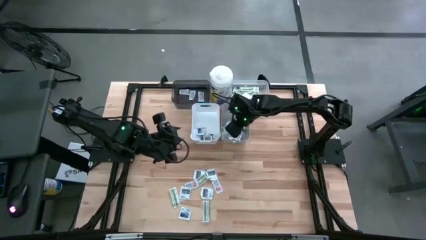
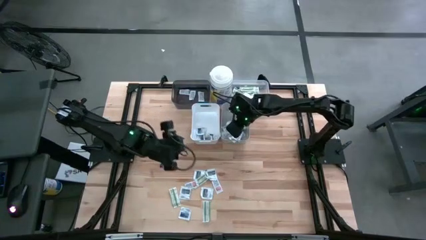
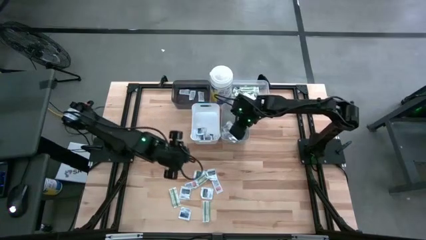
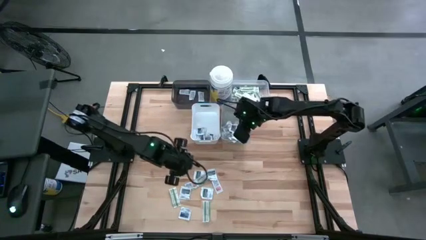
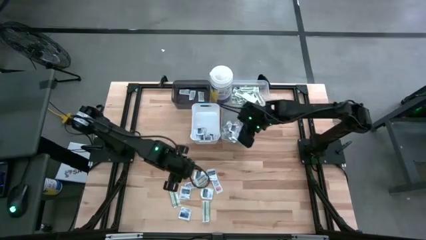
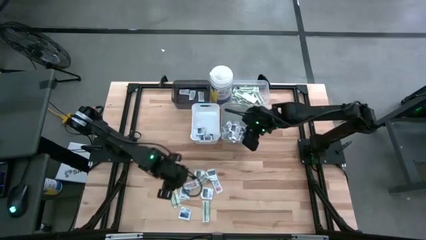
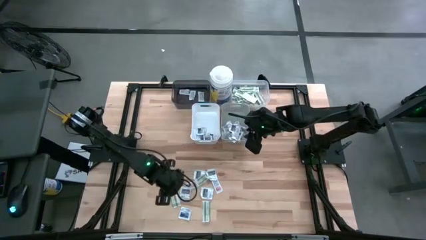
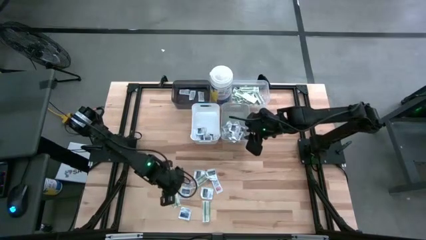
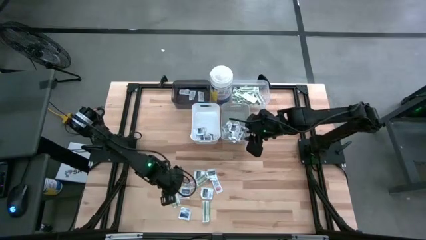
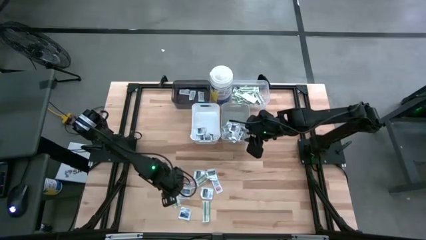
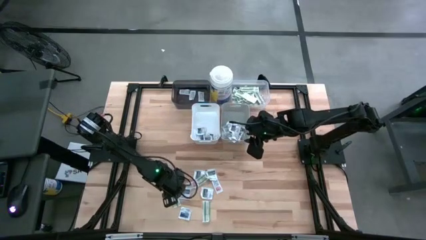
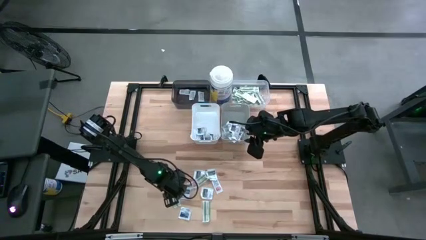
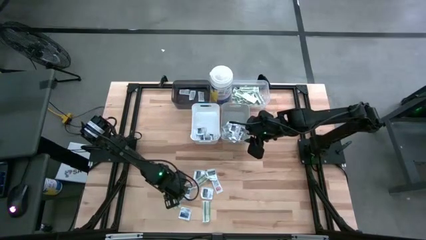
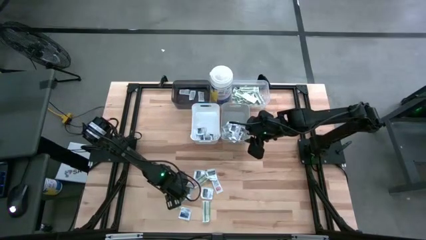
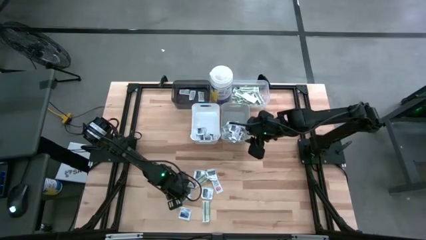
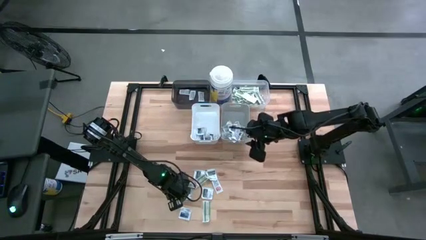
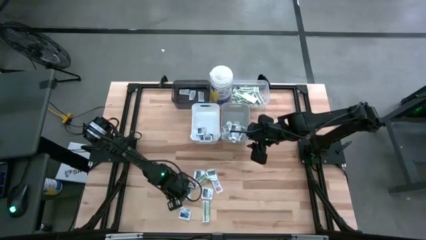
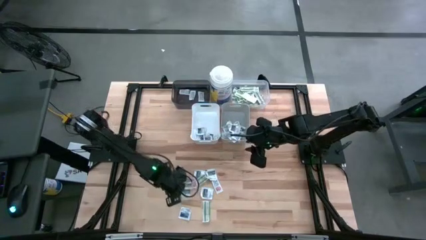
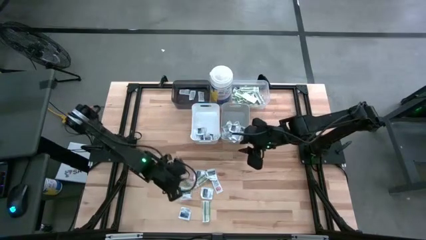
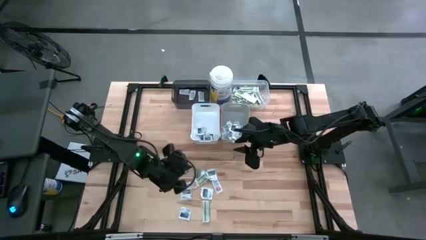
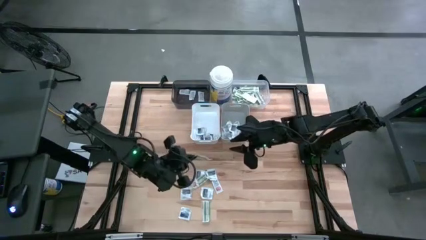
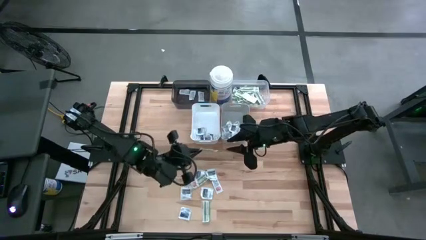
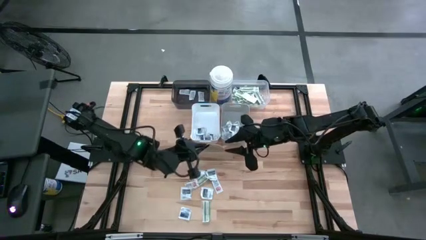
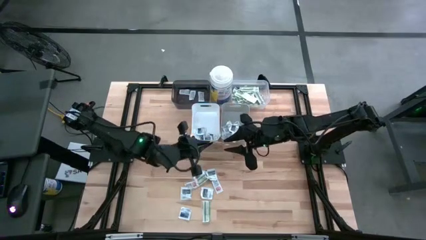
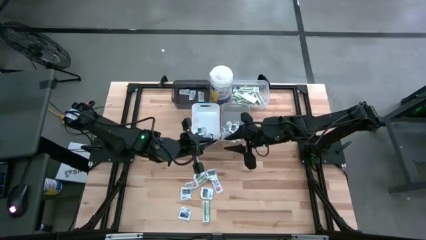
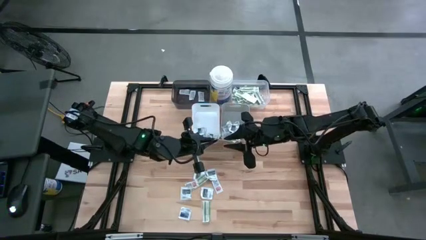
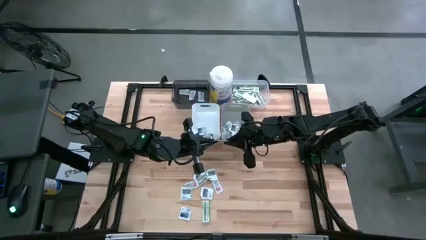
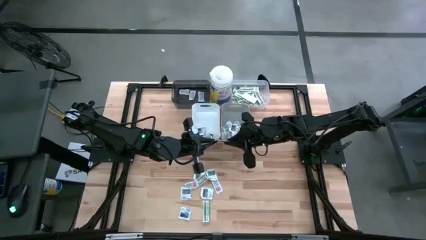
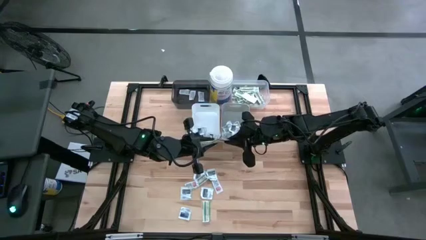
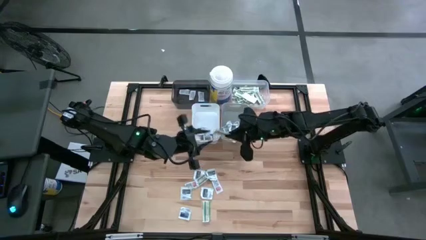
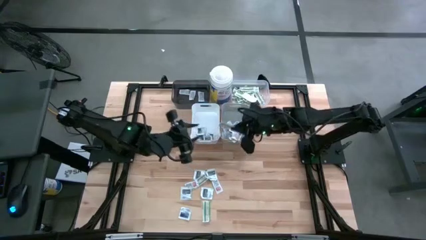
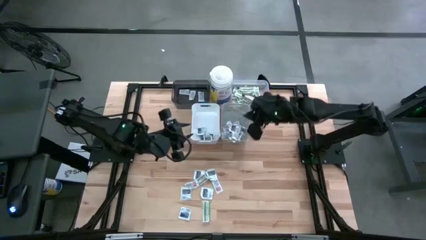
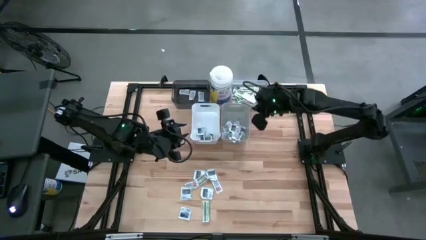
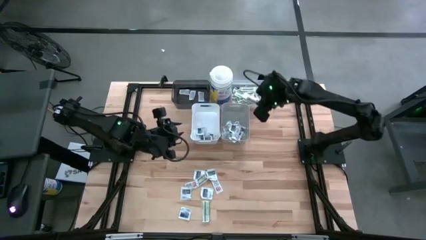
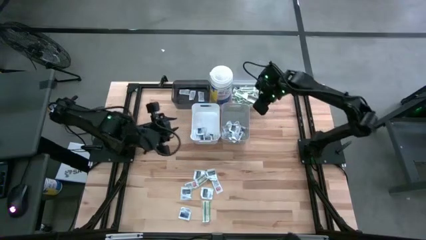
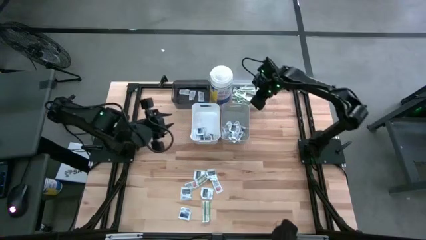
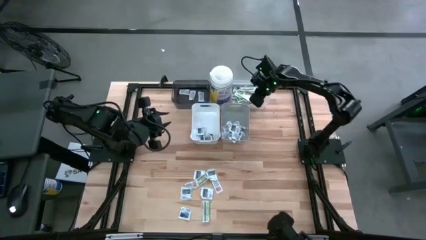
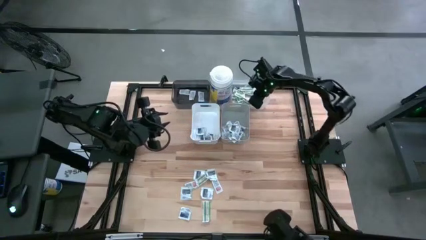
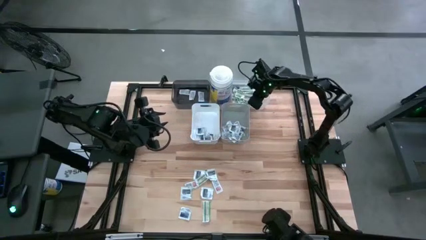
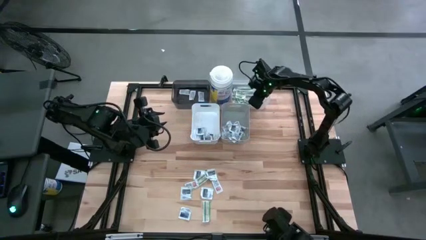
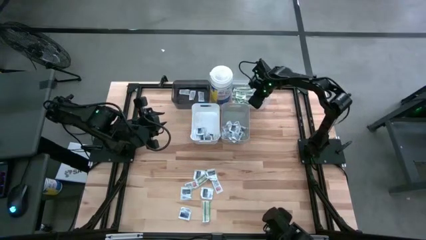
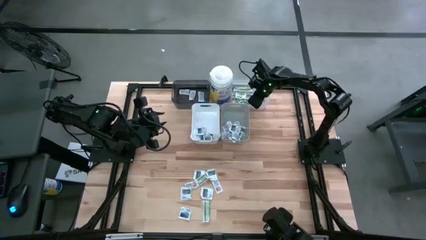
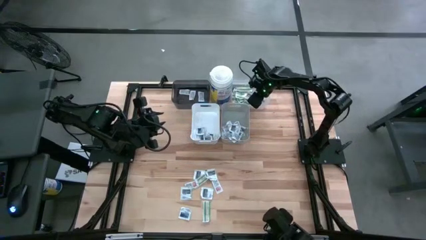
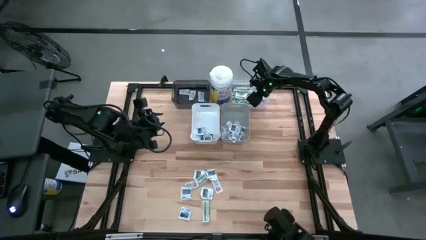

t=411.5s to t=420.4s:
Task: Pick & Place First Aid Supplies
Put the band aid into the transparent bin

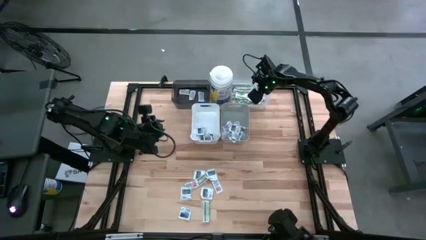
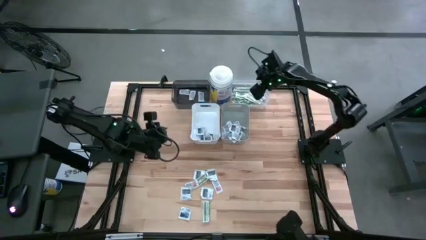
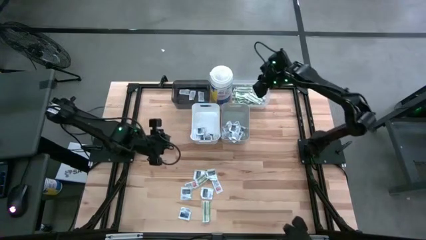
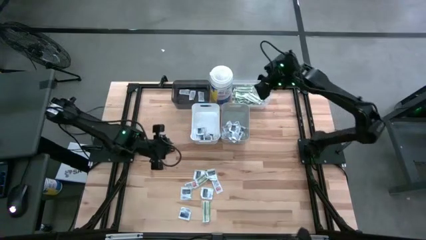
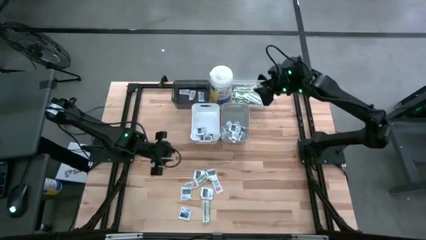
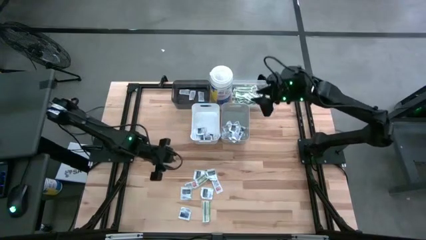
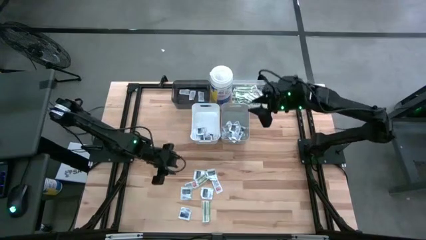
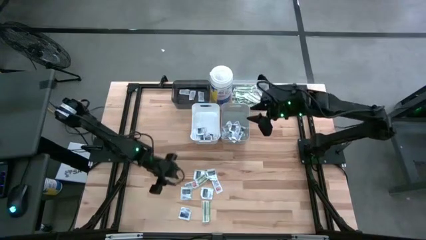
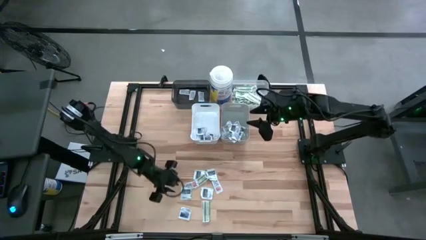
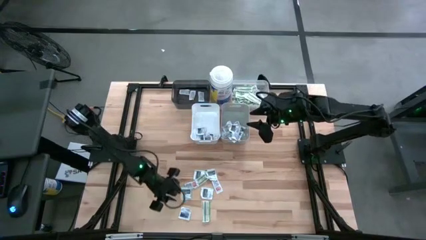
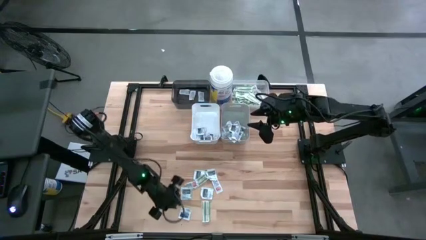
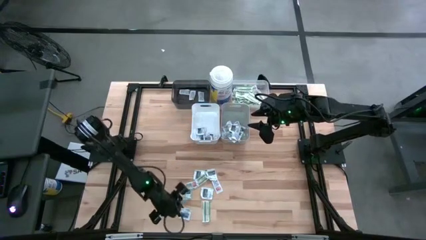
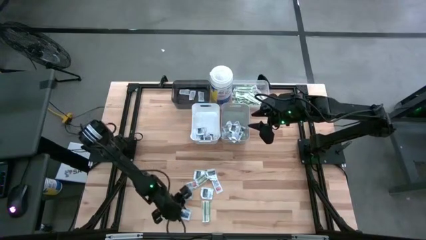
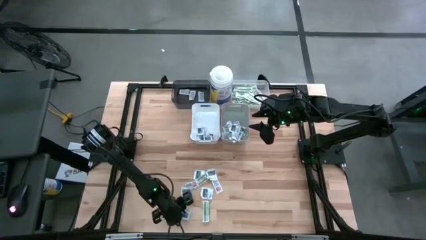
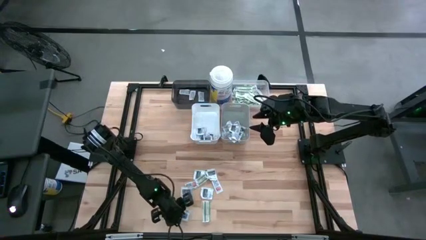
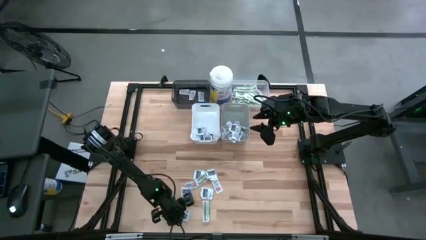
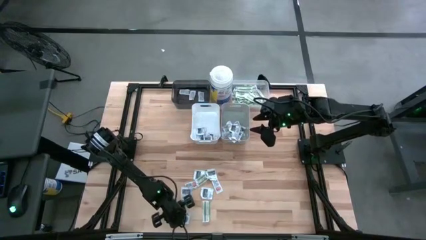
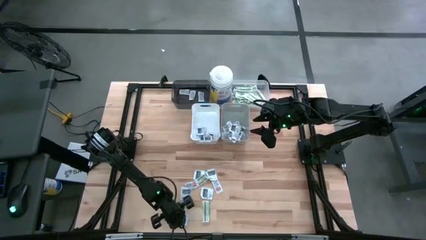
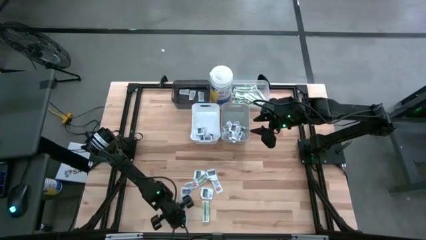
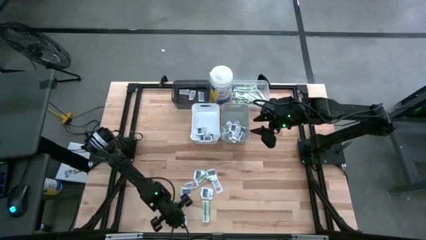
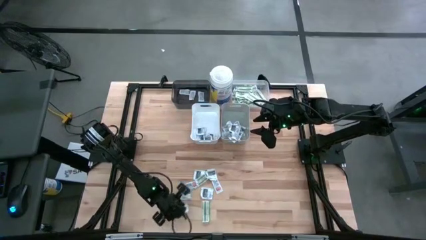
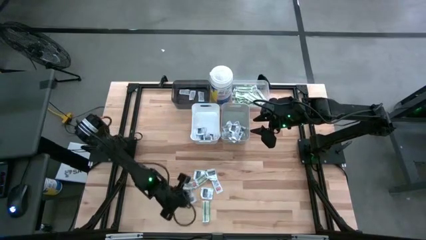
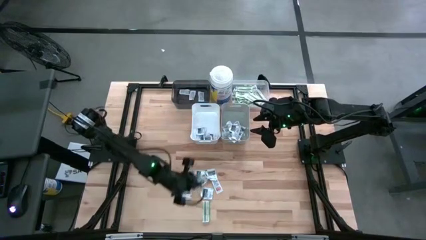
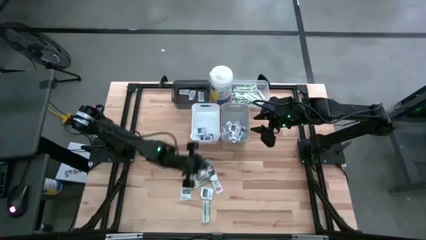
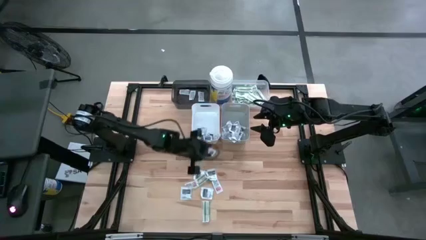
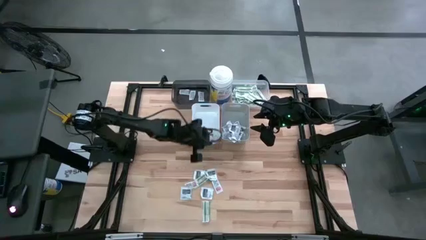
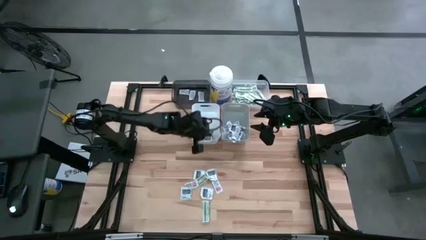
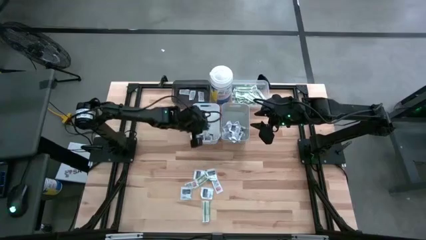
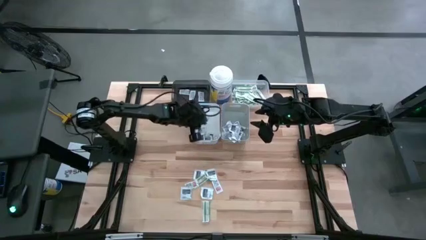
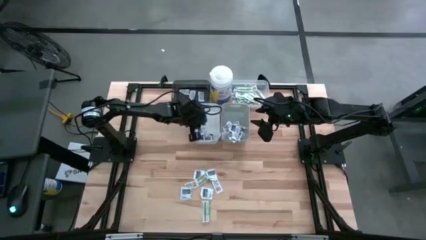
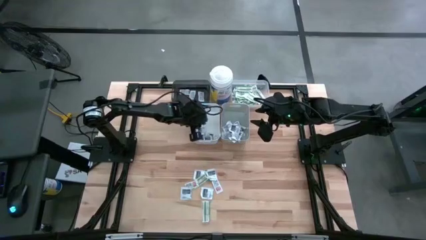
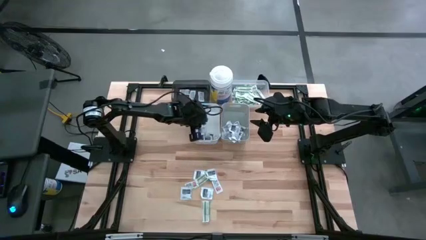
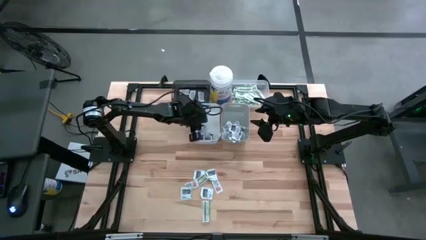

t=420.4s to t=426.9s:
Put the alcohol wipe into the white bin
